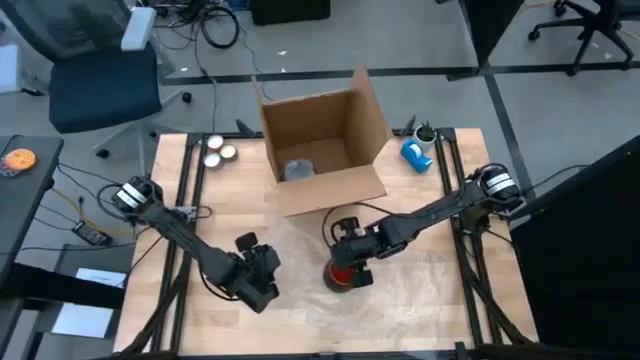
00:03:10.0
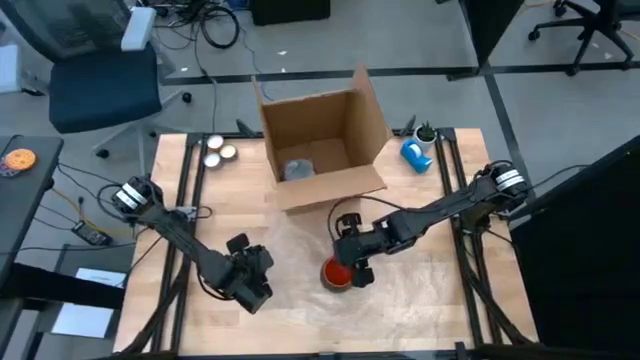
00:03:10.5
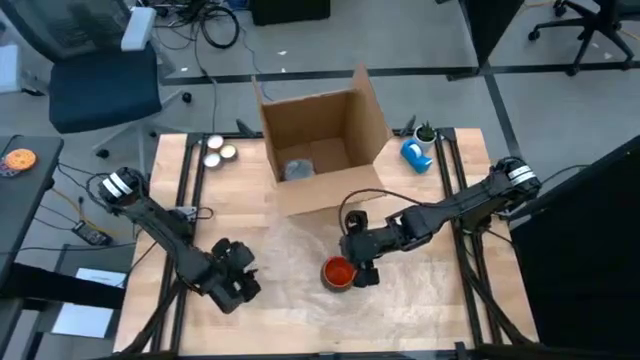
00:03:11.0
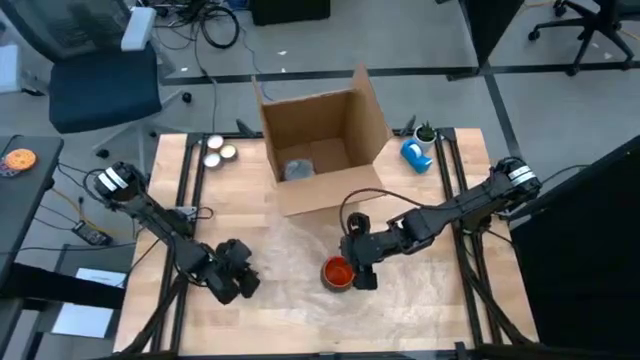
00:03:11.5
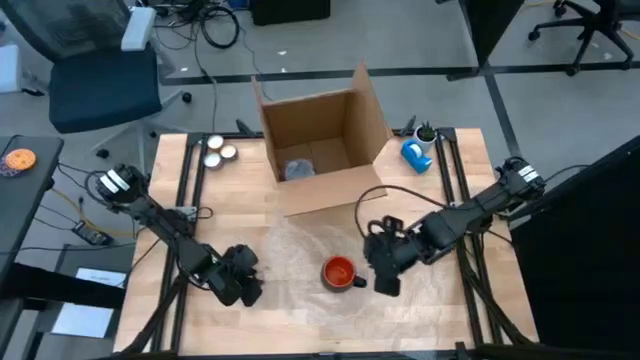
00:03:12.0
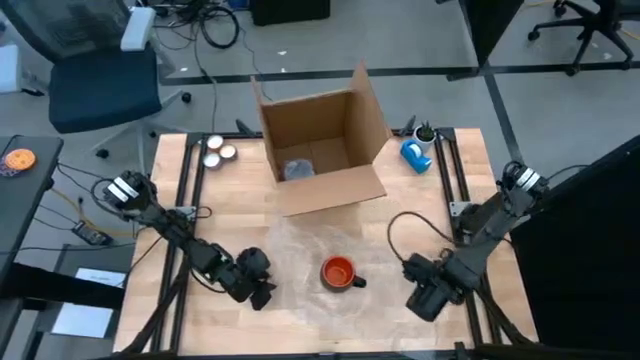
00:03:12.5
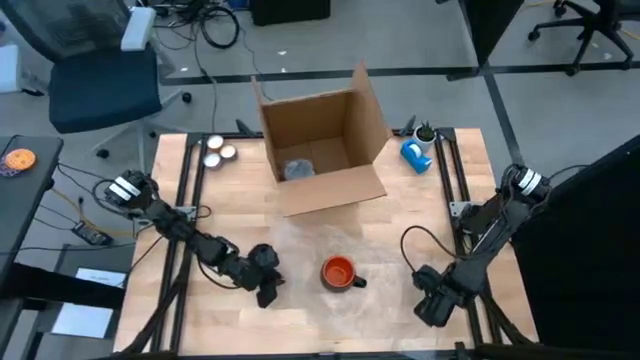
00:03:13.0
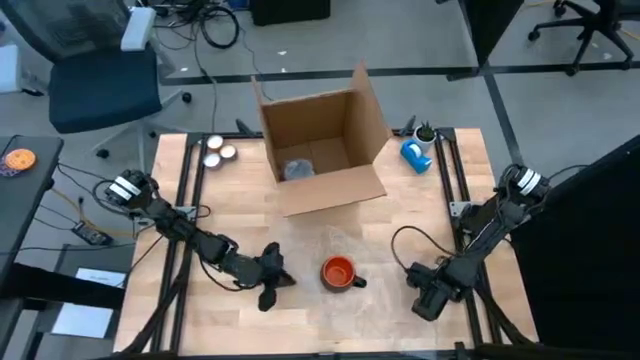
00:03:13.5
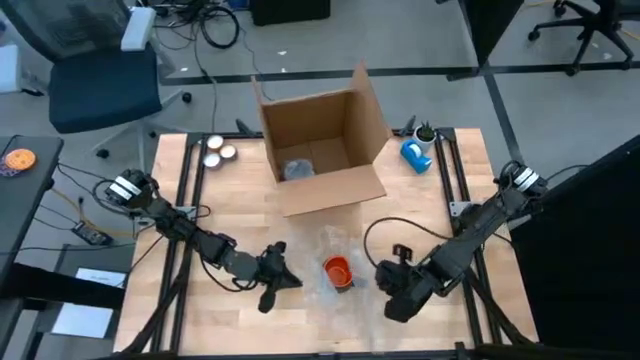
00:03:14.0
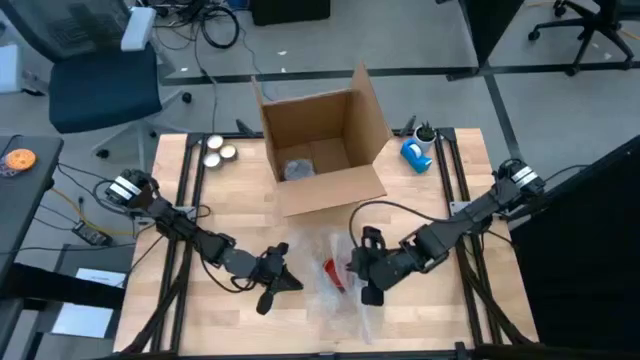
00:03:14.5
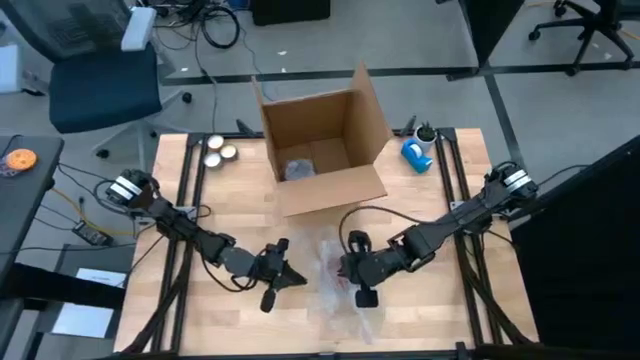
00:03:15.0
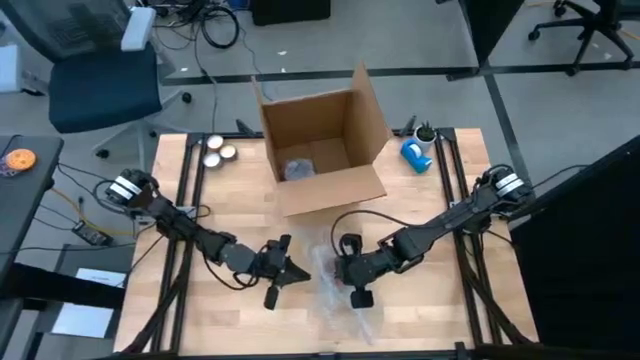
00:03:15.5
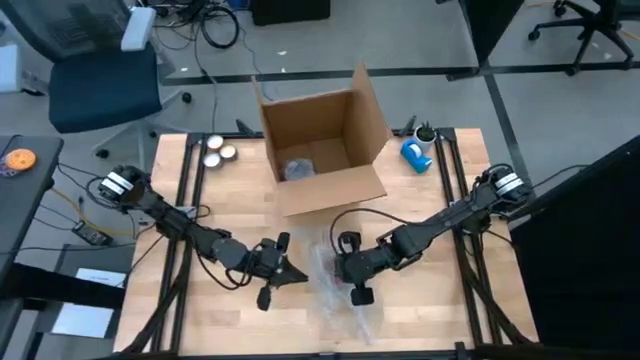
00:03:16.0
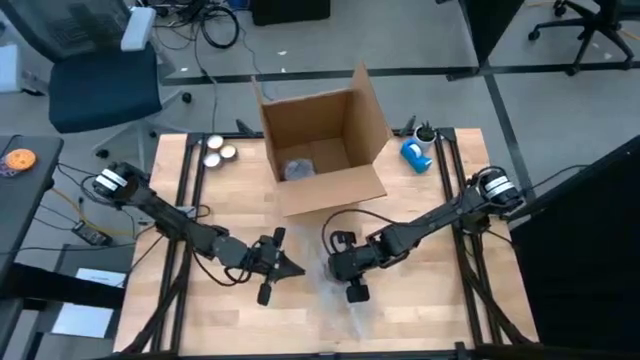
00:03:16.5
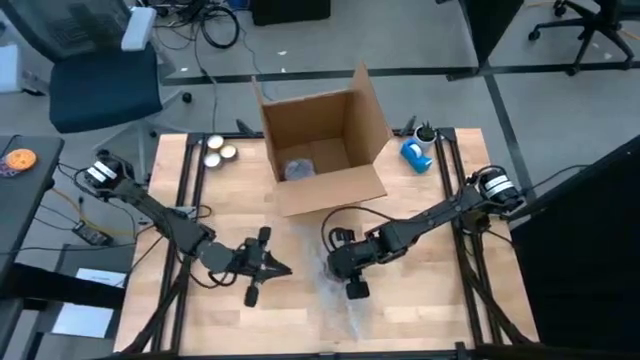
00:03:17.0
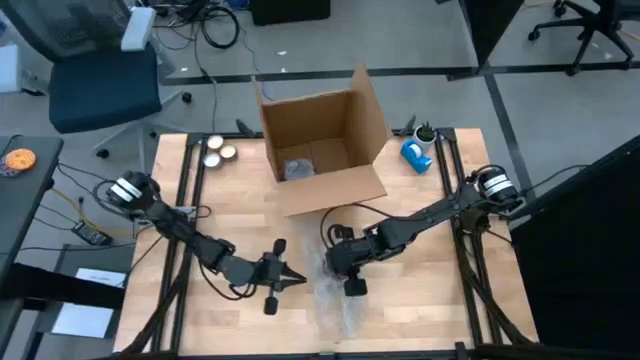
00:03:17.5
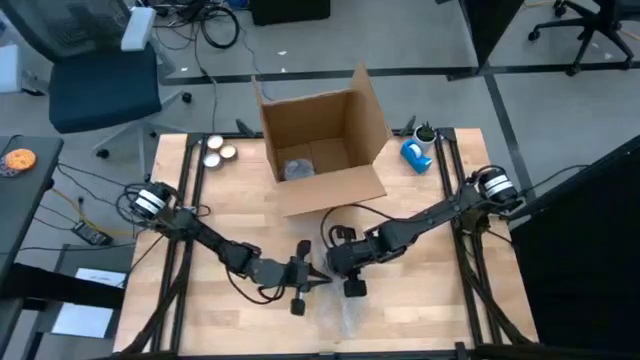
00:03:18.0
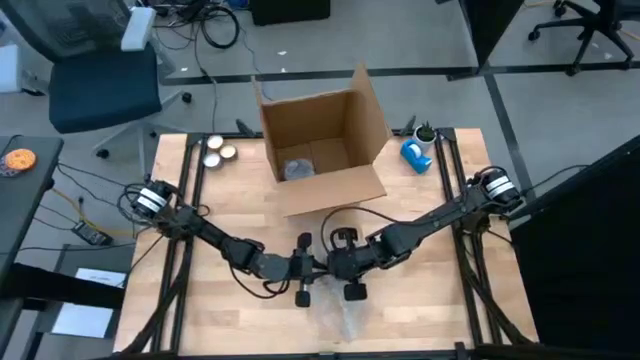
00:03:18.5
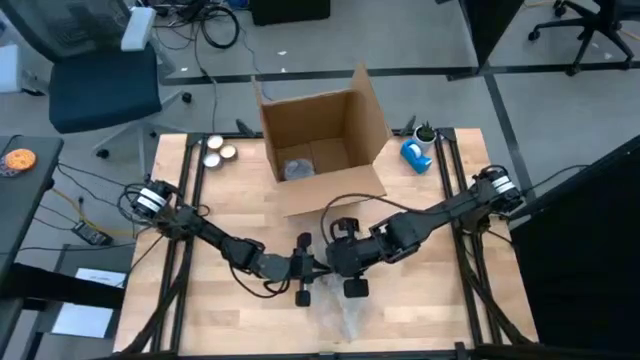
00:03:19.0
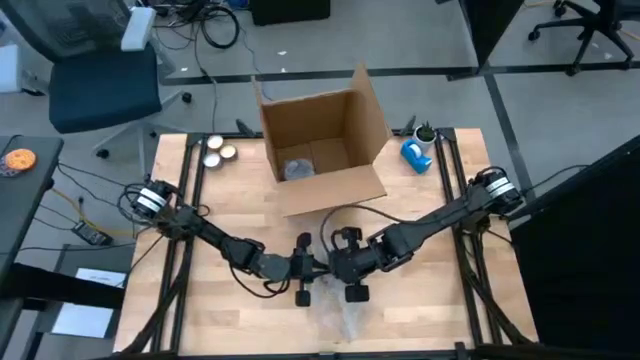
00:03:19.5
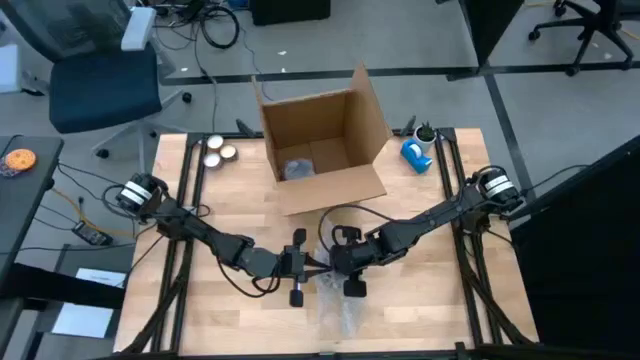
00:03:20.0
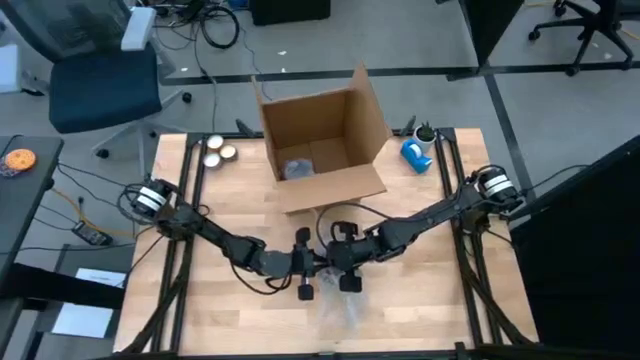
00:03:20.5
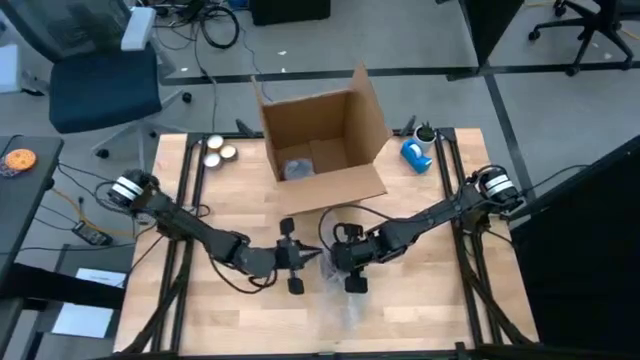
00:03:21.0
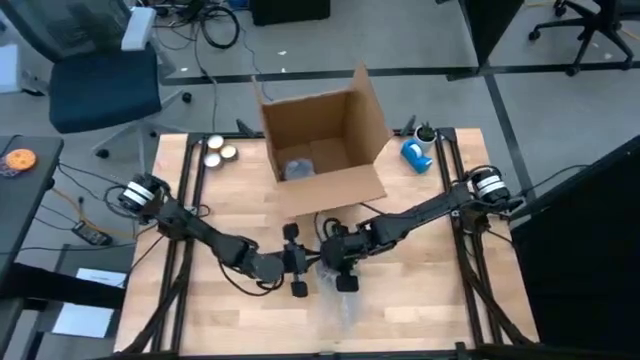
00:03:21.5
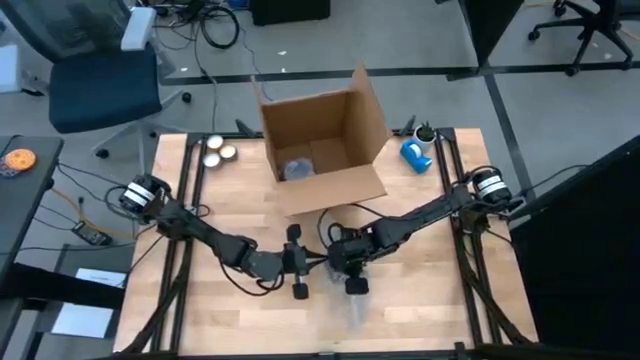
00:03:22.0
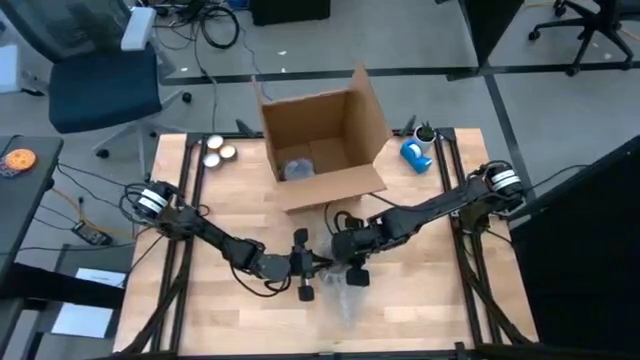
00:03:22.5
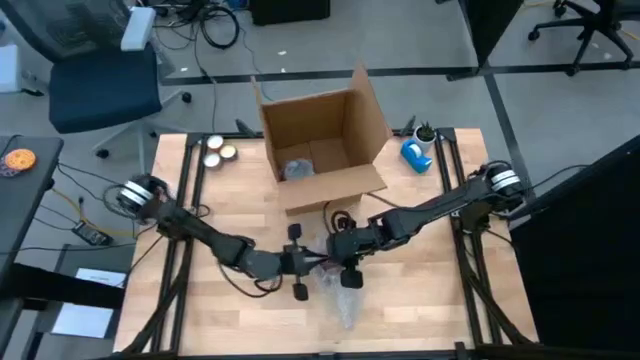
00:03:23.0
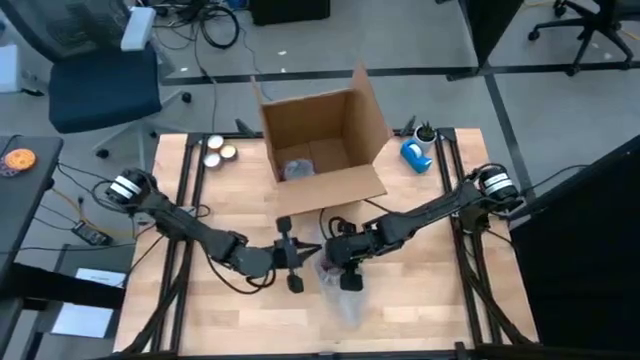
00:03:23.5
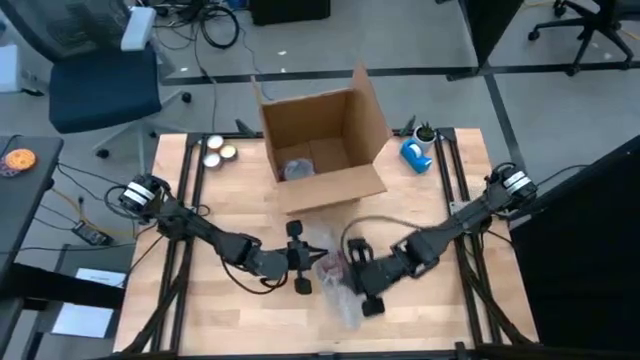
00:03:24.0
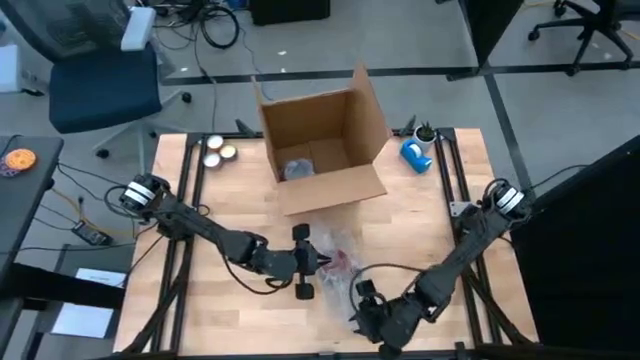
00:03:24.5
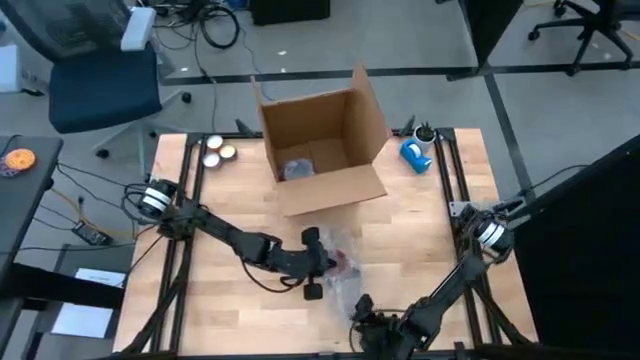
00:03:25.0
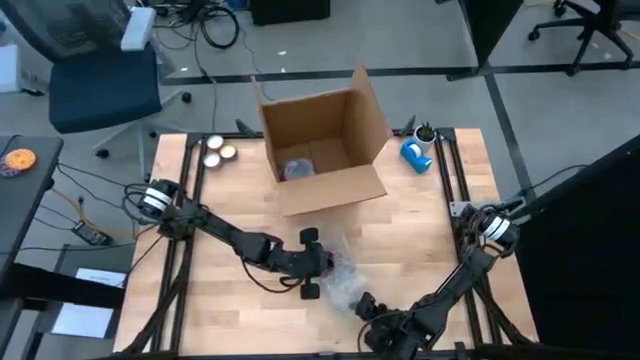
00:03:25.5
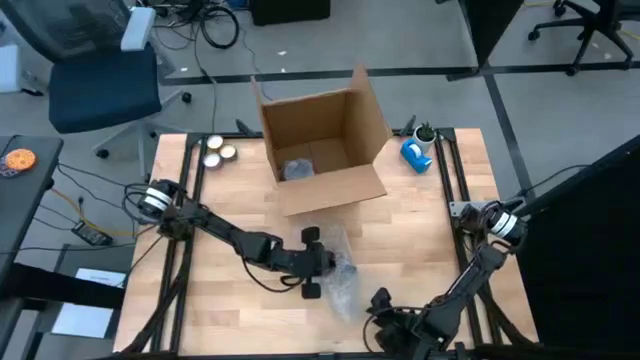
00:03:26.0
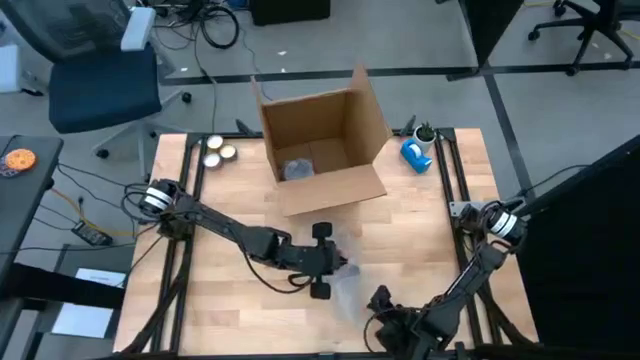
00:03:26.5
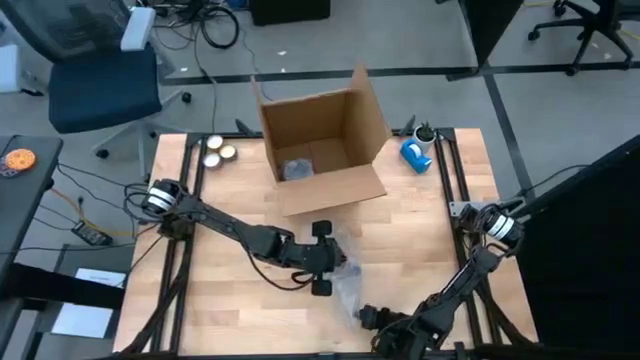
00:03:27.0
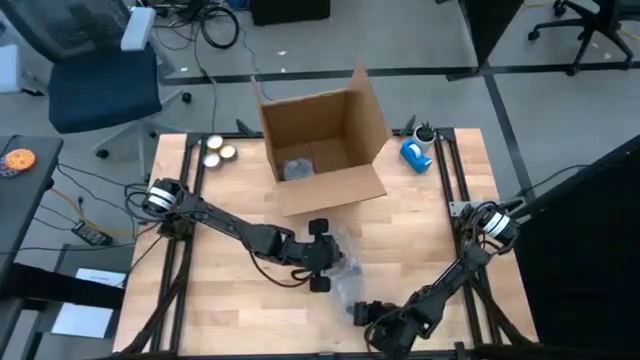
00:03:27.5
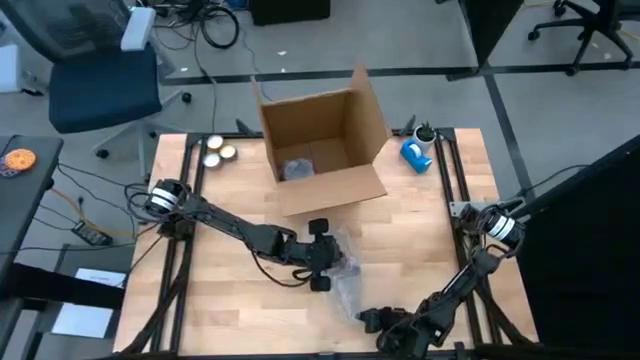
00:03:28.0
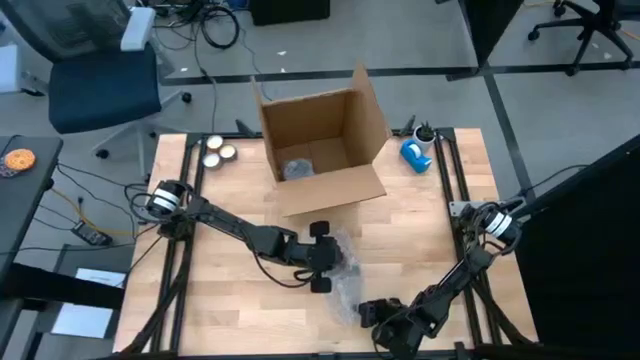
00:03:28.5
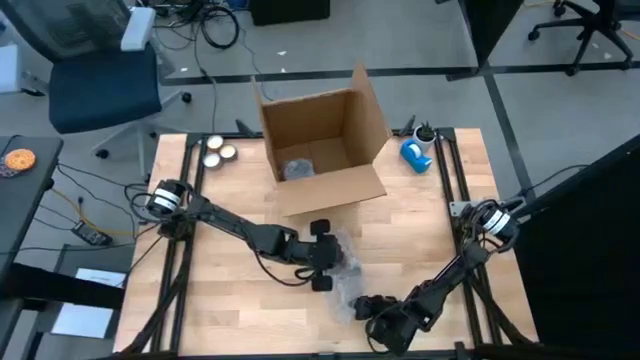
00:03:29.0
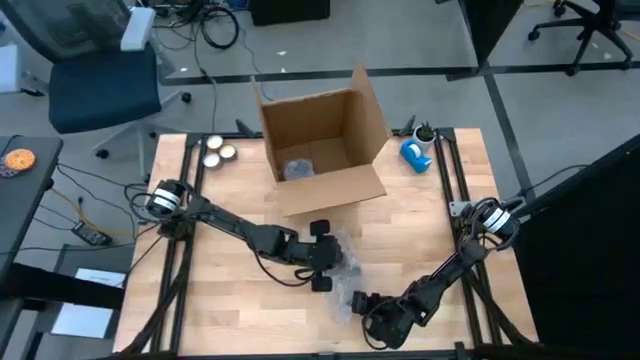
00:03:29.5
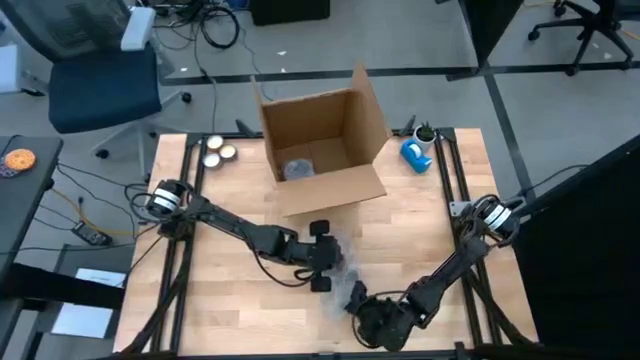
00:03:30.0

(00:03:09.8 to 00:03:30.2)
Task: wrap mug
Wrap the black mug with the bubble wrap
